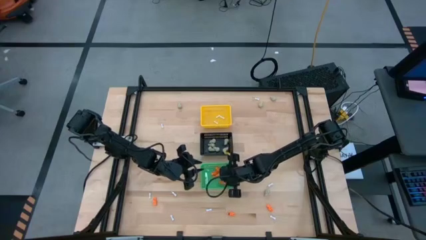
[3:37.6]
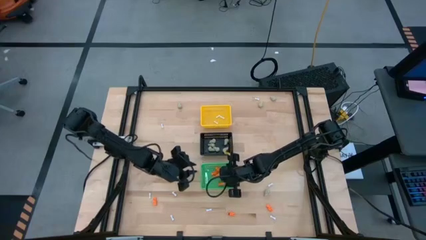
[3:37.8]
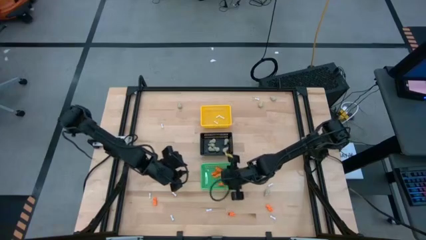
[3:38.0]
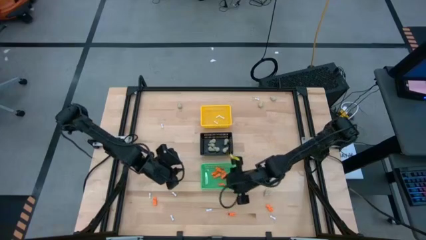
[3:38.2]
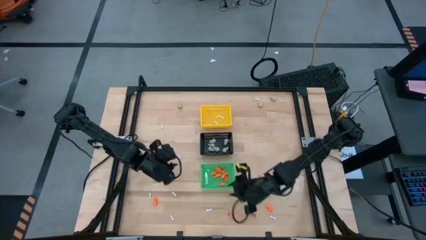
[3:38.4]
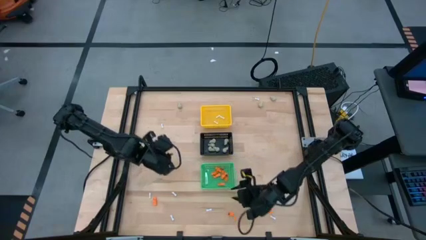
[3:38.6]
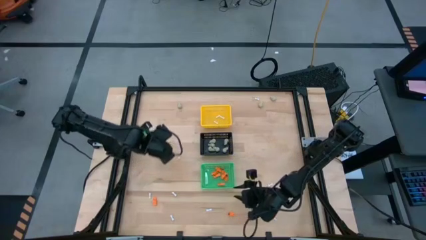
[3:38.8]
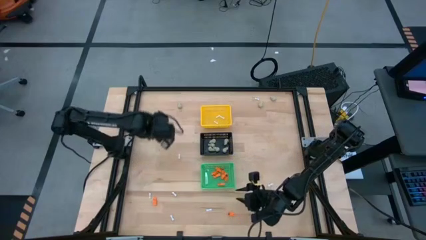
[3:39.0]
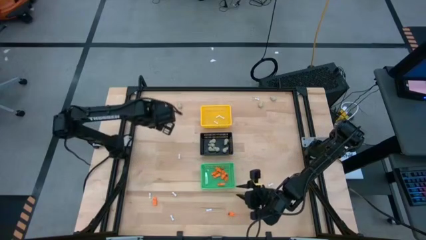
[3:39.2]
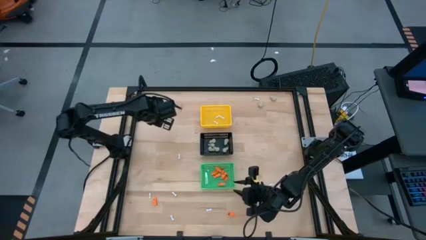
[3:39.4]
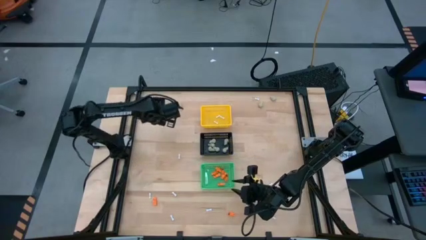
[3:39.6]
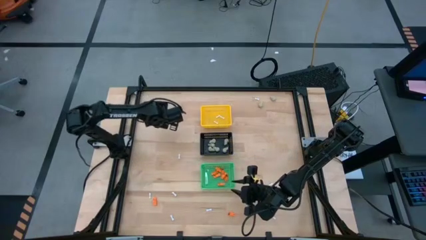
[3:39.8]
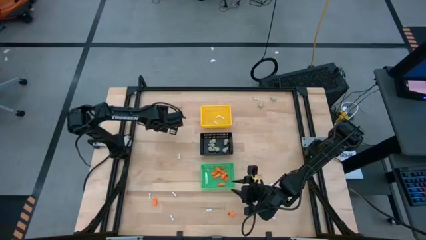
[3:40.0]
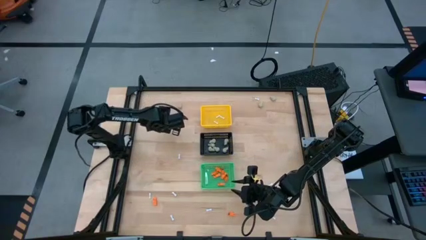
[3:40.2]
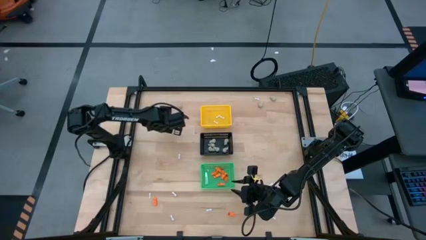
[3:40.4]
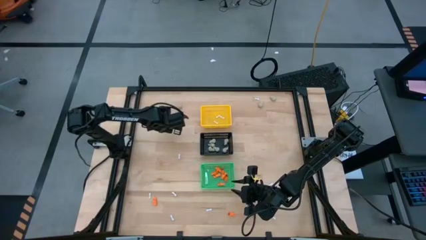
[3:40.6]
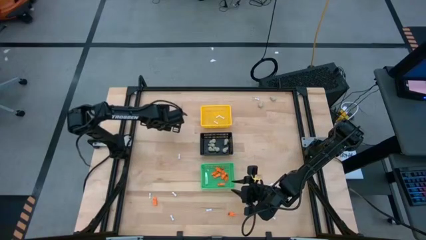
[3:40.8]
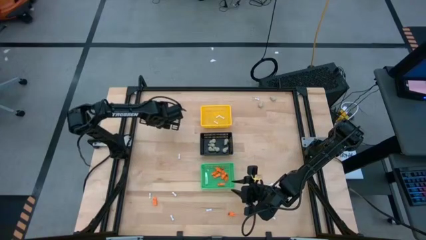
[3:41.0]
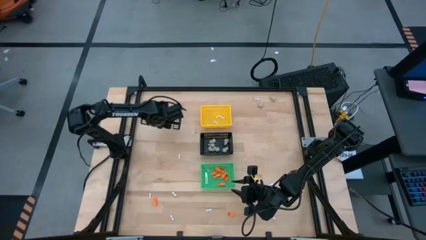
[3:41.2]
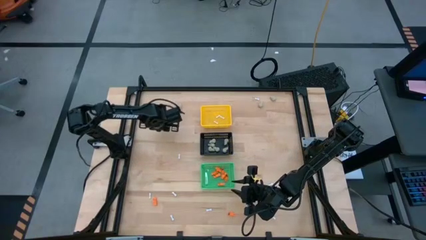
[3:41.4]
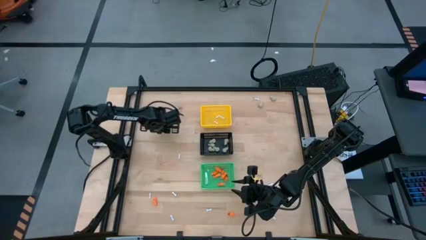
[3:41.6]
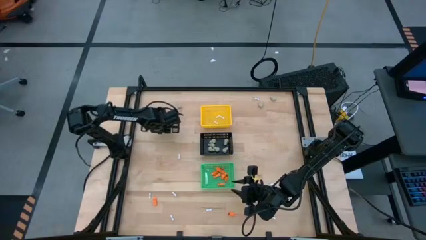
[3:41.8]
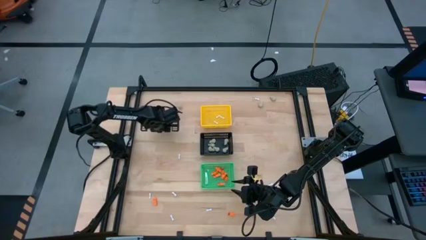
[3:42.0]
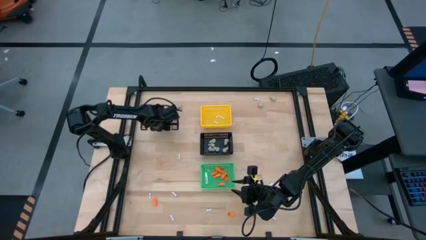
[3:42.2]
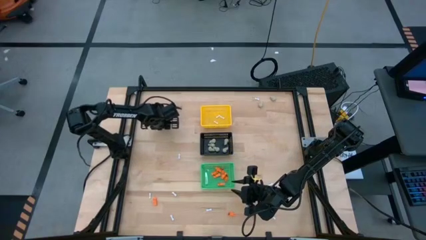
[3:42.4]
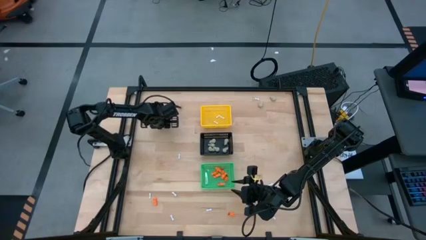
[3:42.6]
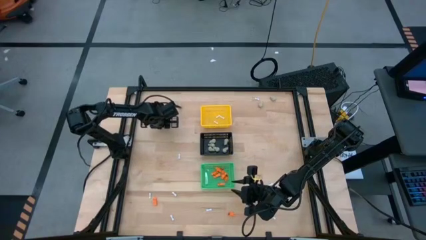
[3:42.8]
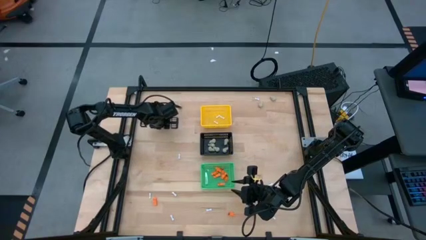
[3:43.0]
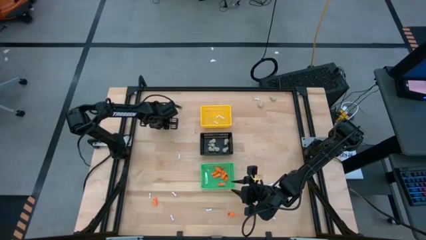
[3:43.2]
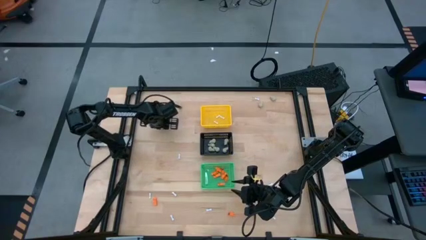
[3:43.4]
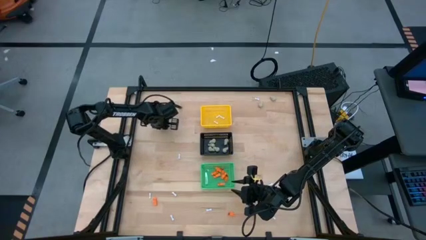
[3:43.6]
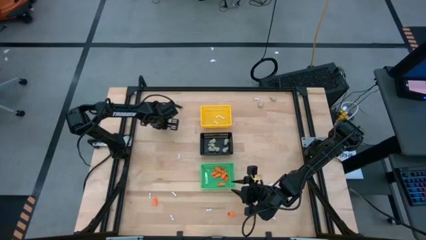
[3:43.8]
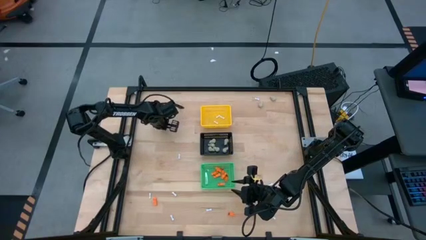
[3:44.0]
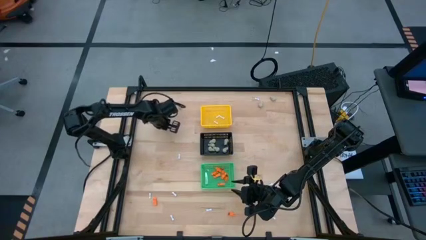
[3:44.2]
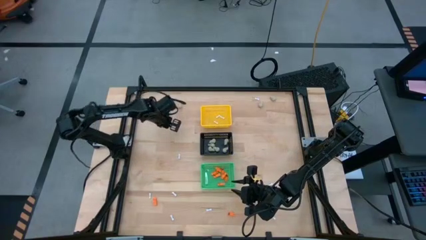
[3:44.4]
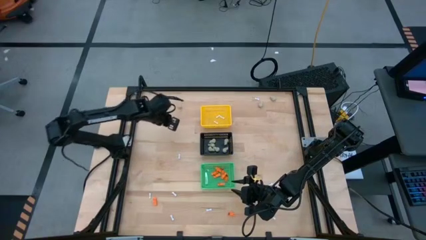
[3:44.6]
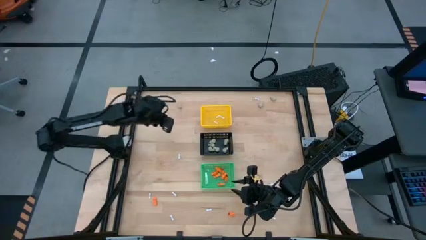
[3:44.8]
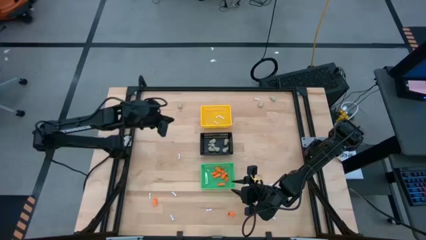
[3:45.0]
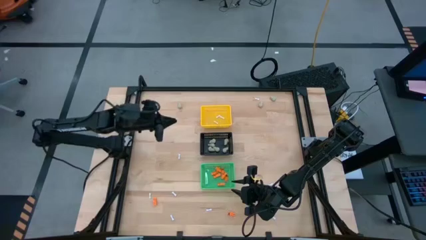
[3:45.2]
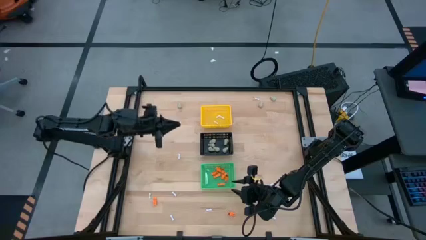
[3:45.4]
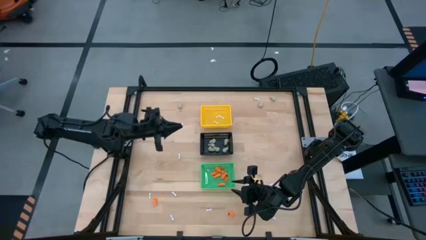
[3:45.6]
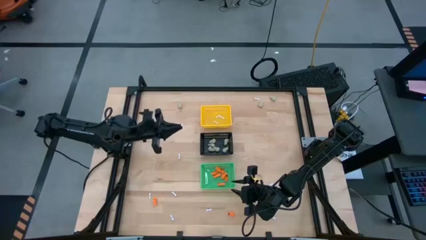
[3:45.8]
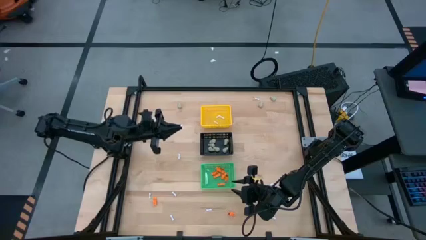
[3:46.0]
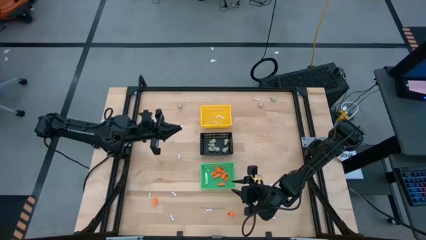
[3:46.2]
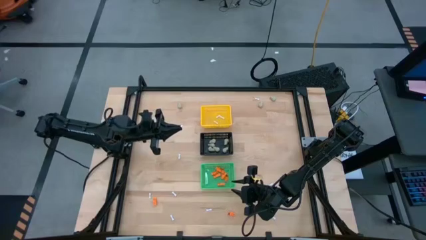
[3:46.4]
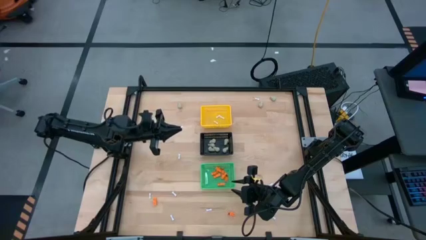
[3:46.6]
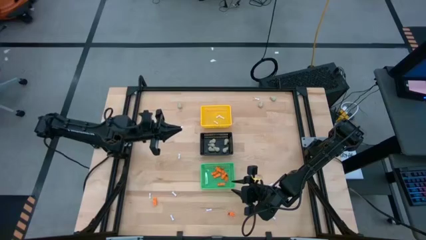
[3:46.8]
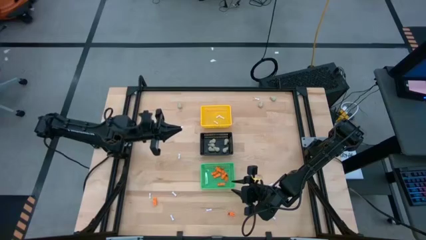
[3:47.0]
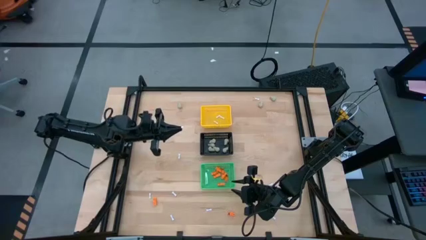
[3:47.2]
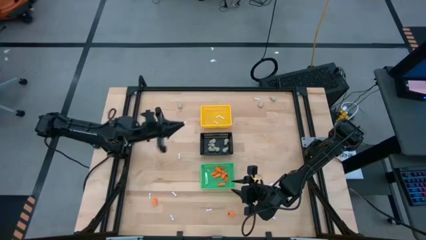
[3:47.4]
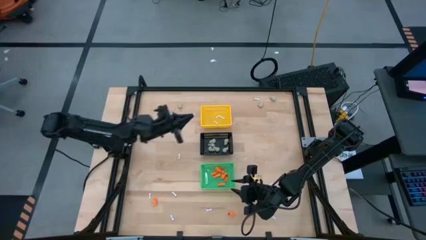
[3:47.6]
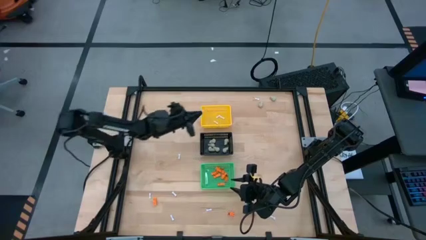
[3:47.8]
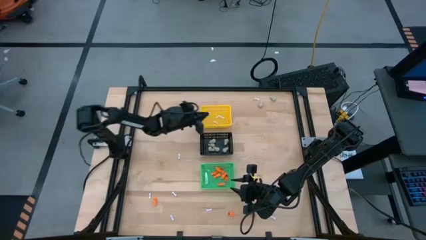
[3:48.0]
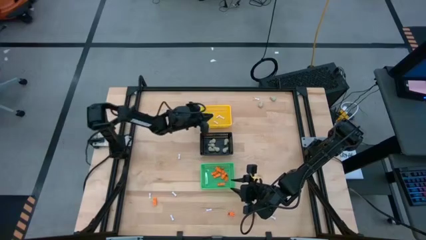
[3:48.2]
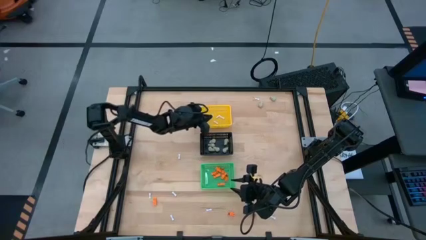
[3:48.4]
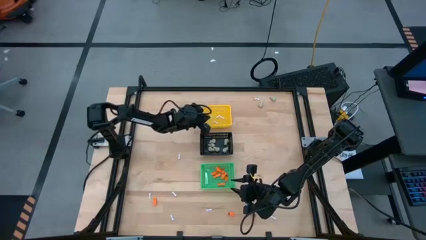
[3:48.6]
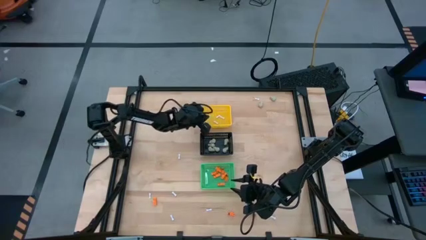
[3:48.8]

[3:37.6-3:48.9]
Task: Sort Halloween decoration
Put the white bone toy into the yellow basket
